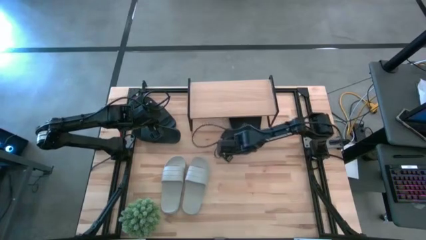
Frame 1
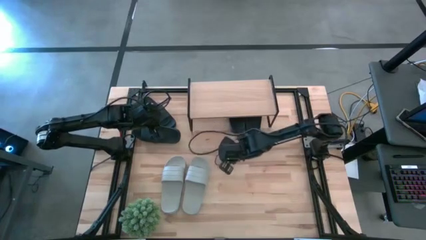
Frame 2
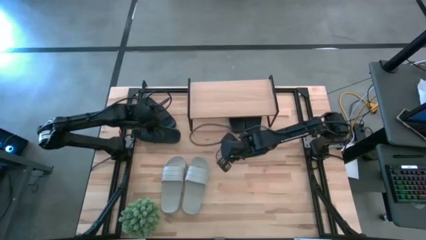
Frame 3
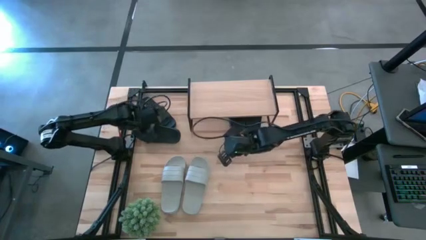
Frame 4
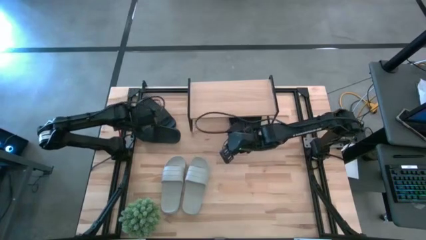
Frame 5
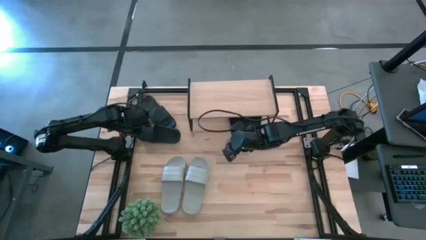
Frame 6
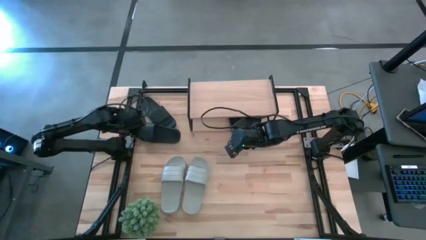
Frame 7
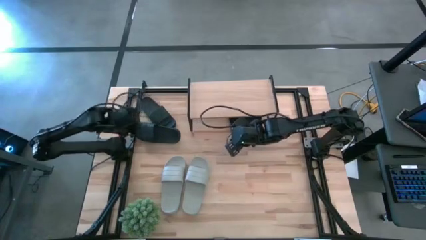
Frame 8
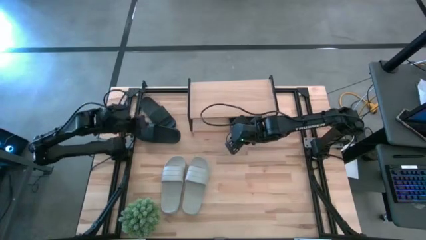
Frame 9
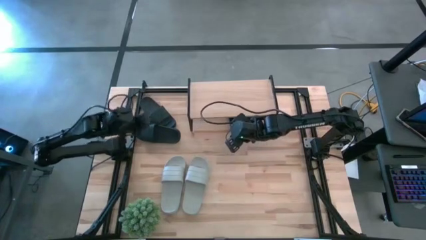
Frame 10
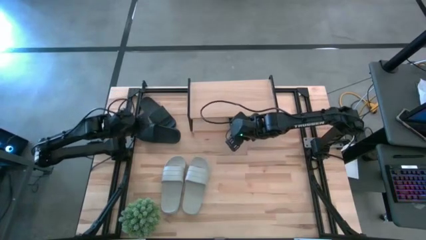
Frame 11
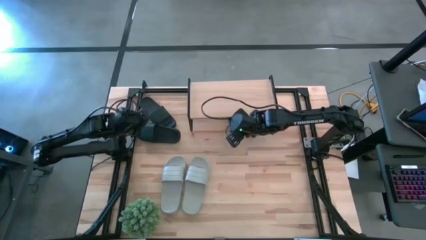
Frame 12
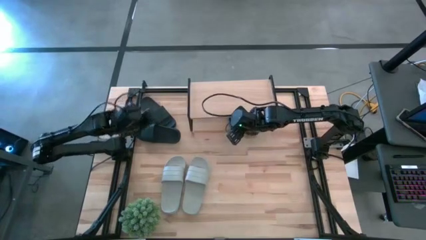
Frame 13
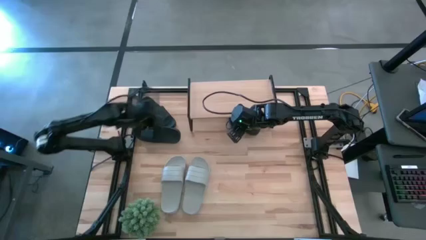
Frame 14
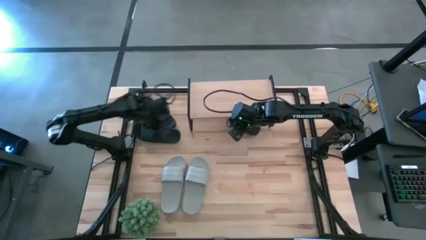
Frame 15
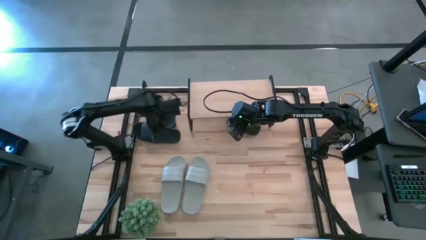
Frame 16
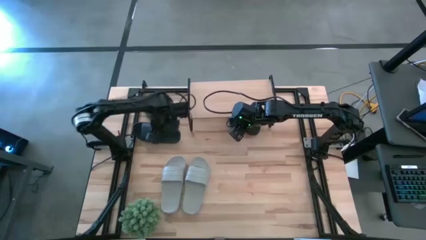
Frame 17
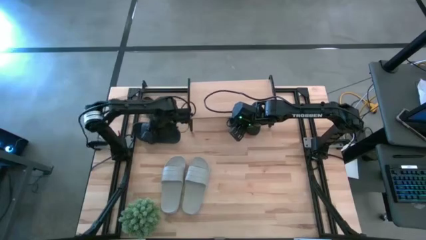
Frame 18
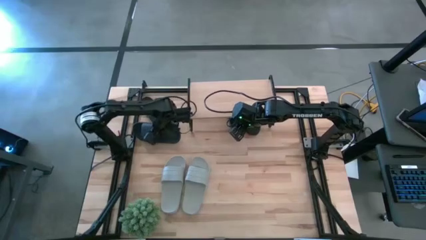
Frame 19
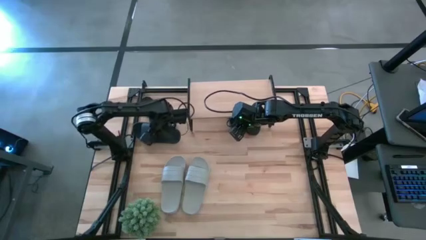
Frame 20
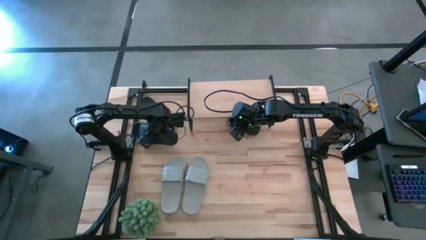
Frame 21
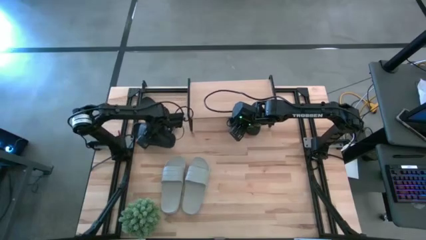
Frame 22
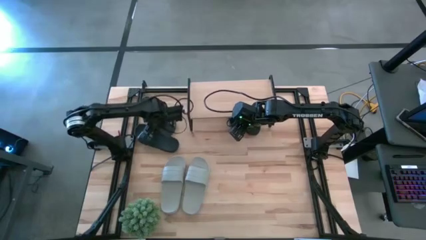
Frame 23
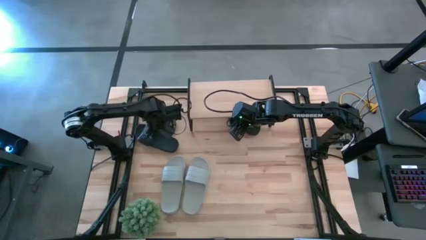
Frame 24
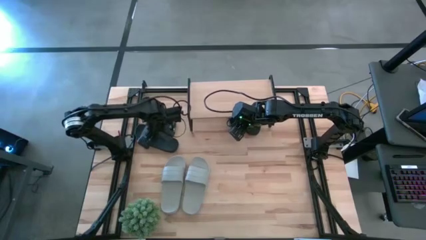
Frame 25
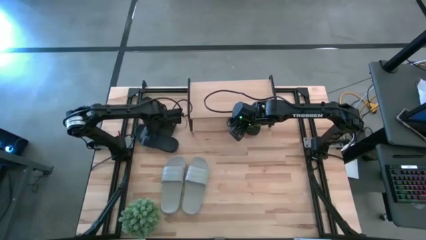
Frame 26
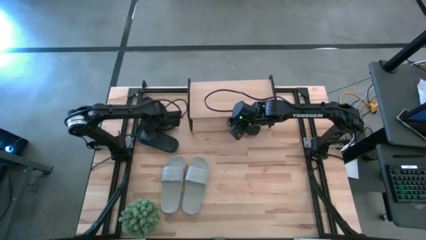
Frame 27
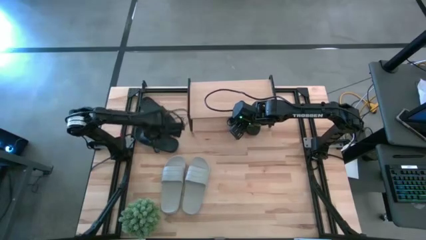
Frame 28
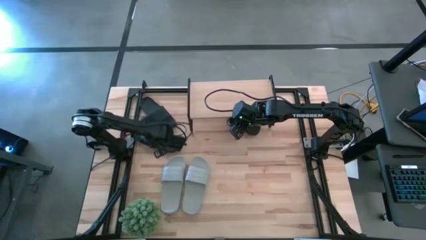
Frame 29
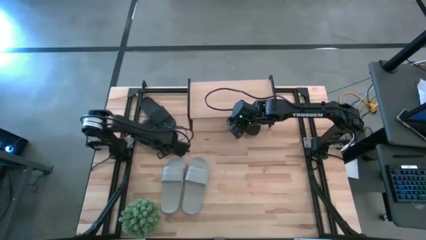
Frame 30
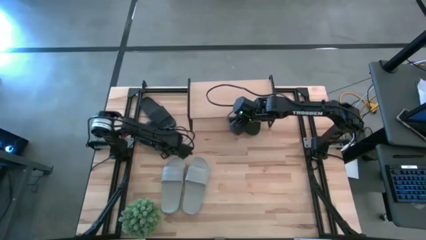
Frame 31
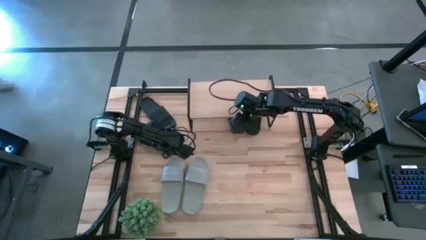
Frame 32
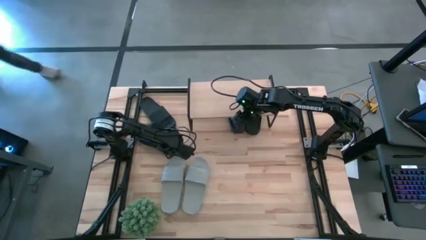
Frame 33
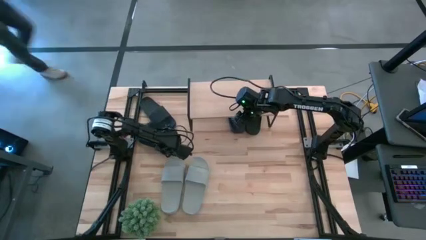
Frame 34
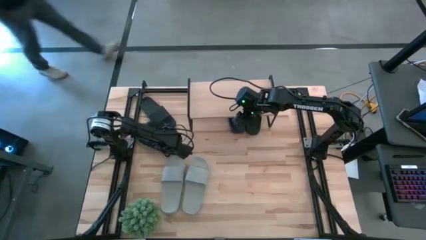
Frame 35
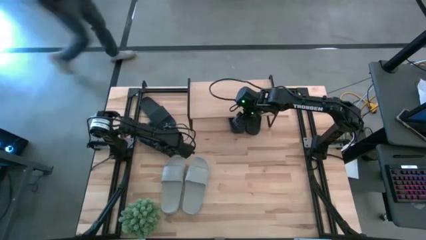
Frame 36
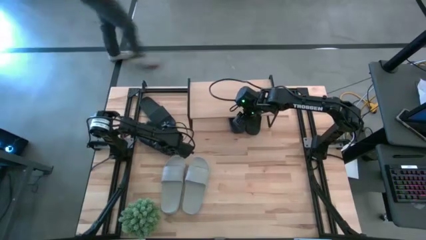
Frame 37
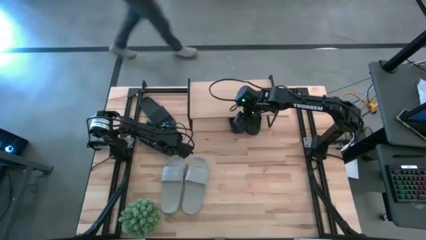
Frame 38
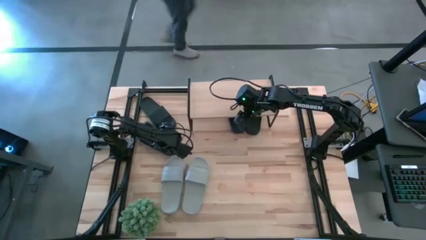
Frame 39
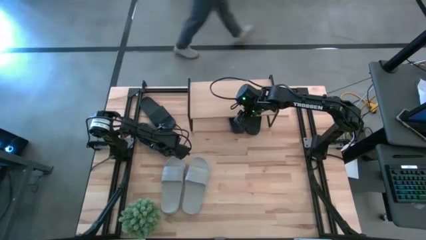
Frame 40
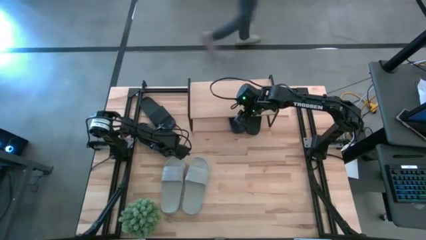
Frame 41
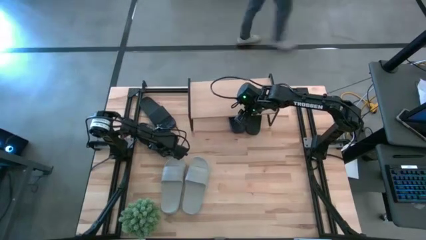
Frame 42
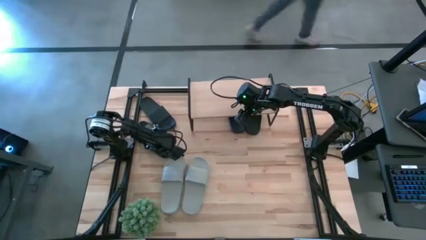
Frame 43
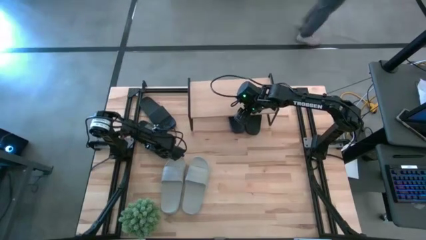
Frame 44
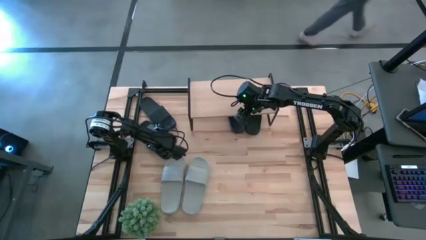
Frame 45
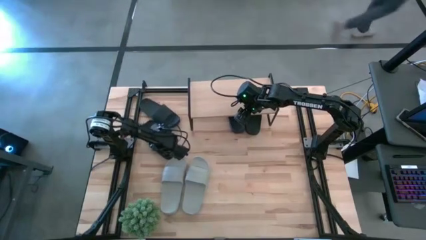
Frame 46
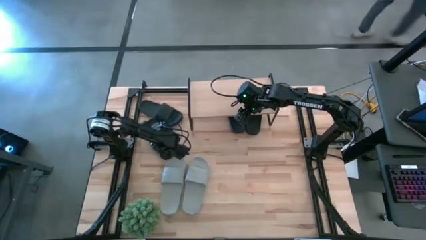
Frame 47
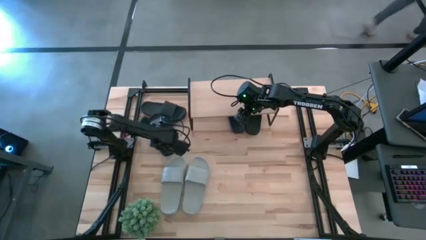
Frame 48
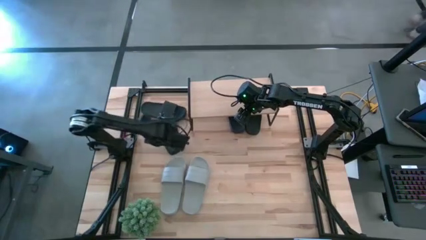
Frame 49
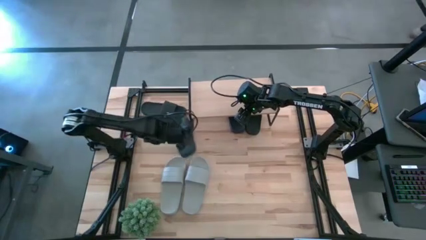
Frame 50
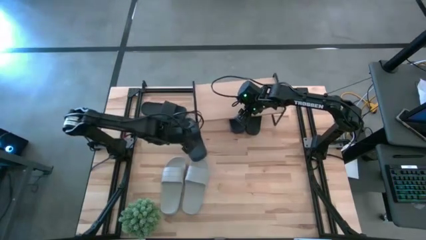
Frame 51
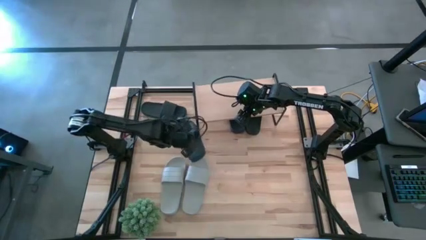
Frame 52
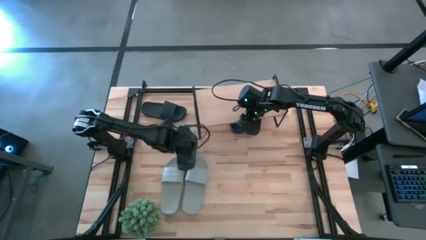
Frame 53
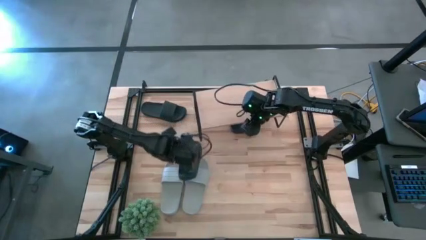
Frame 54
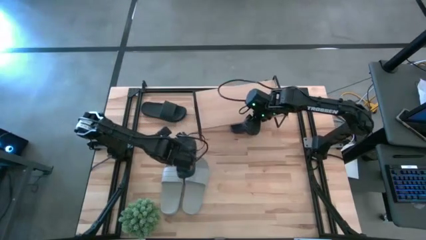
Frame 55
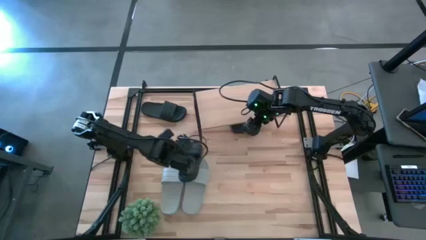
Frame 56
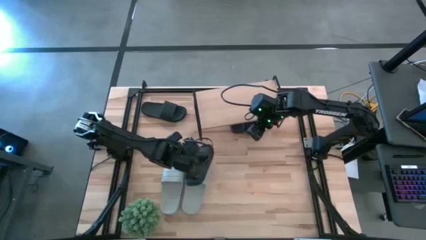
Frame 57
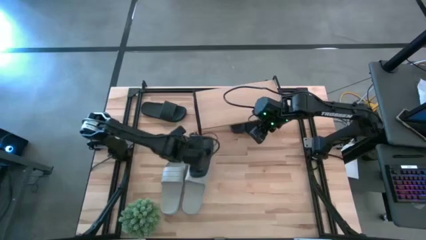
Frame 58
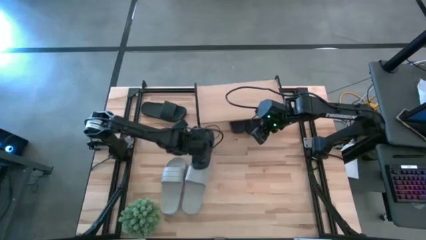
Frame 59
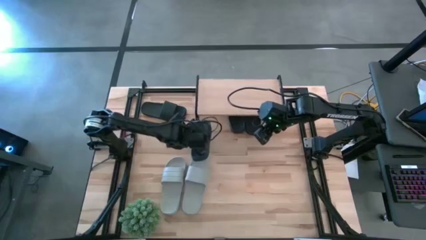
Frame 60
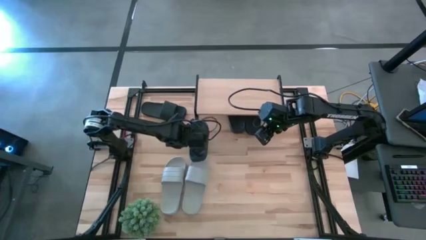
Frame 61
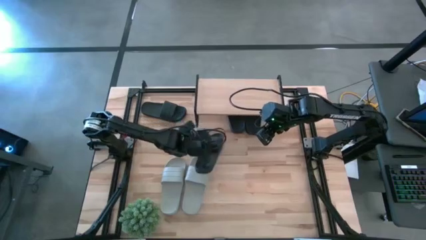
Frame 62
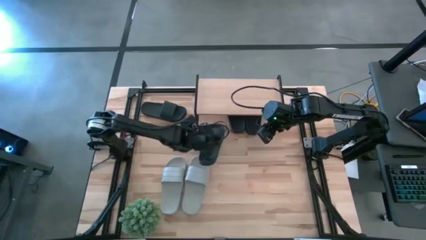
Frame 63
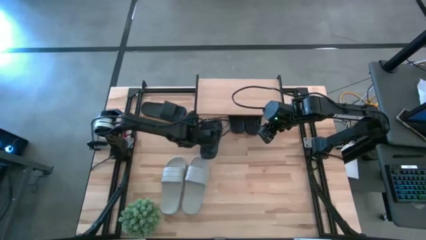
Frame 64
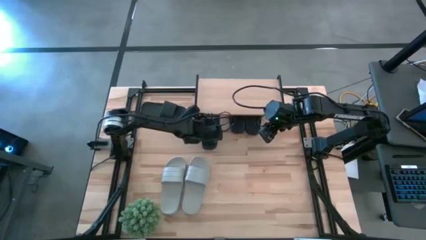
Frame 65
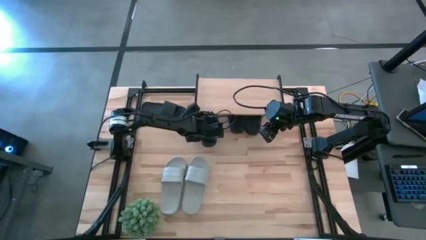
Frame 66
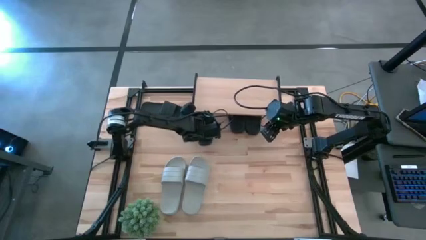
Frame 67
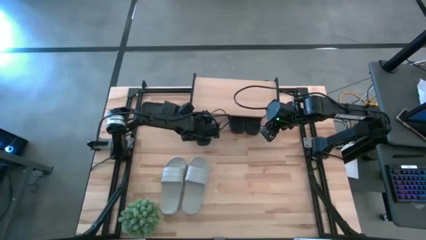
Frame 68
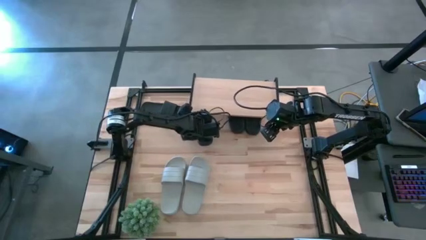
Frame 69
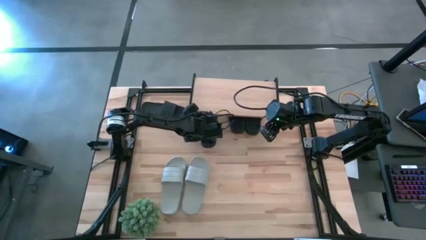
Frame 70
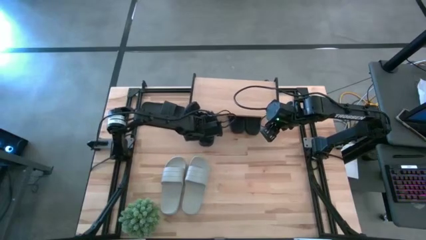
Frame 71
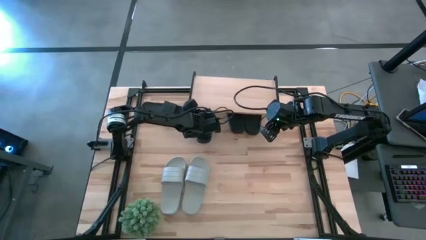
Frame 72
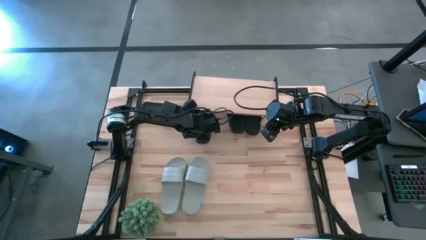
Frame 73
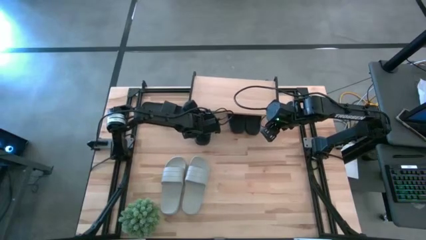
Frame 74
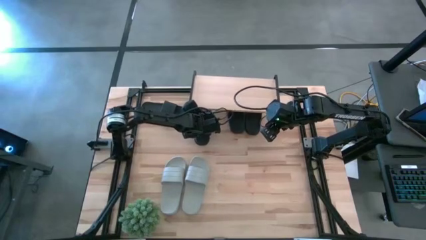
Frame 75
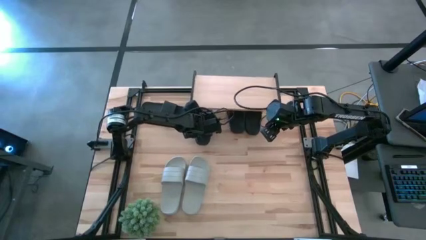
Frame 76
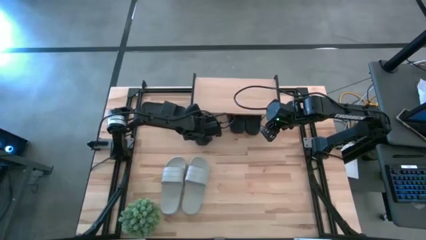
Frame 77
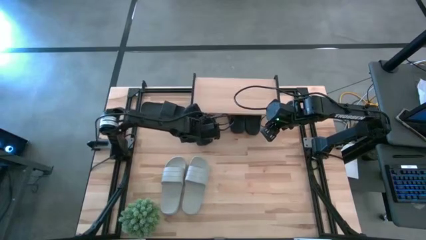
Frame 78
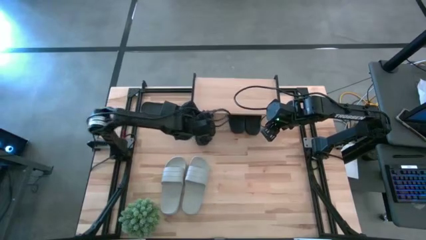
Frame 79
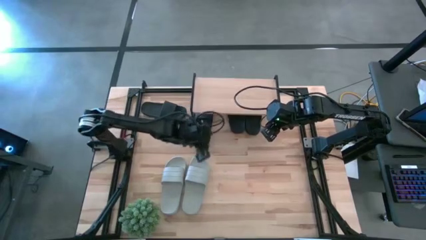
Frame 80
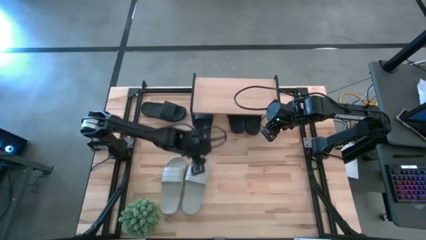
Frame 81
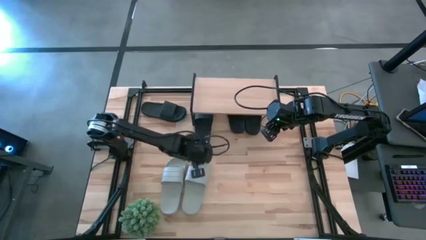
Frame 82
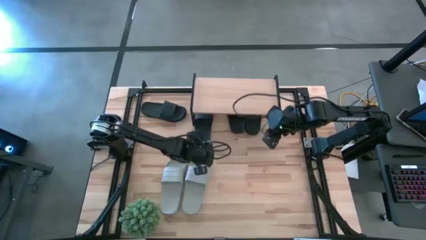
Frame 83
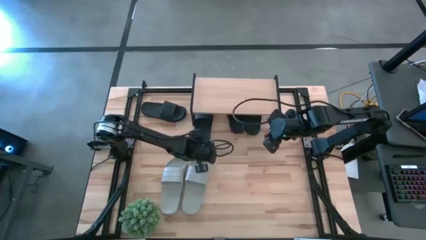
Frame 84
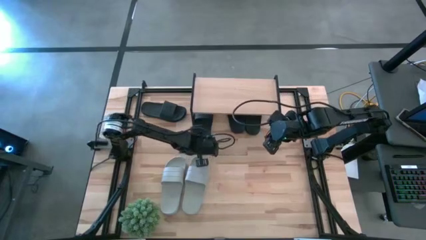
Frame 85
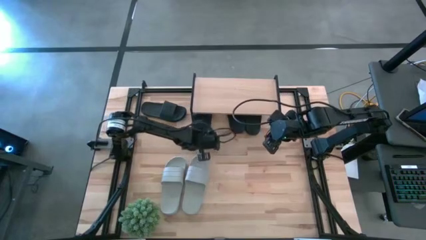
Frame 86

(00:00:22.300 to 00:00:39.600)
Task: Pick and place slides into the shelf
Put the black slide under the shelf
